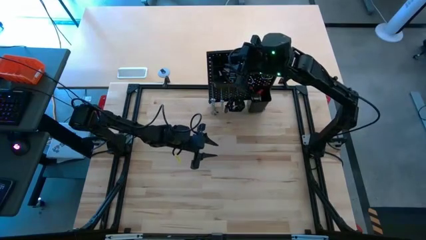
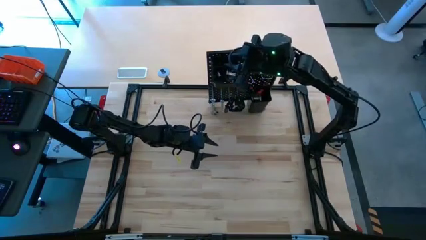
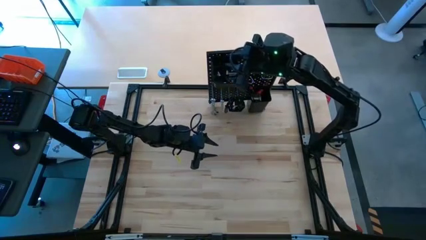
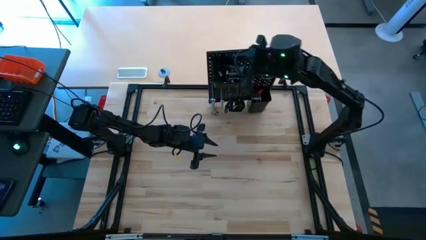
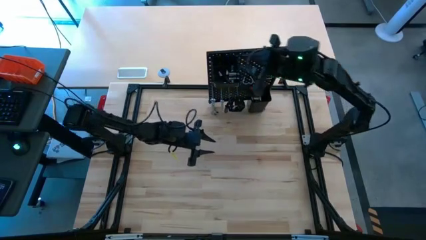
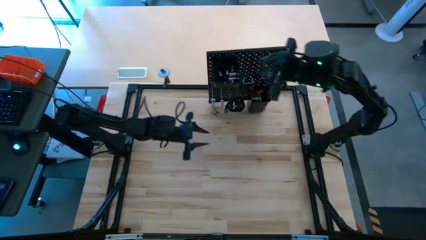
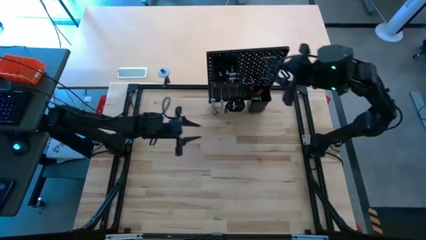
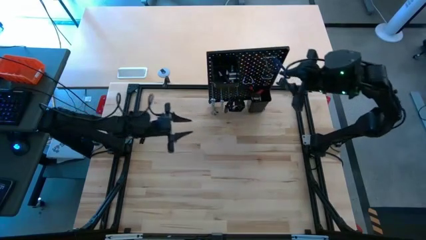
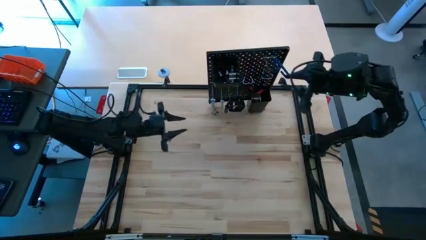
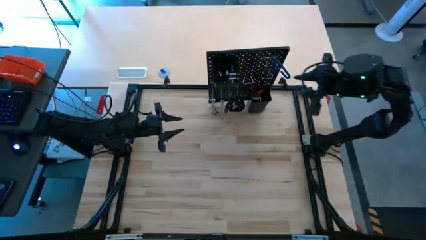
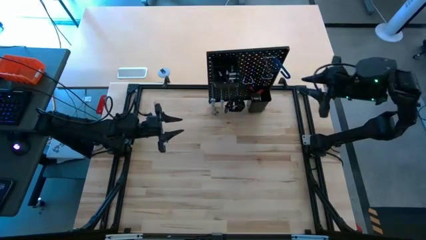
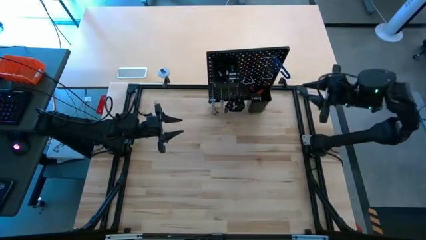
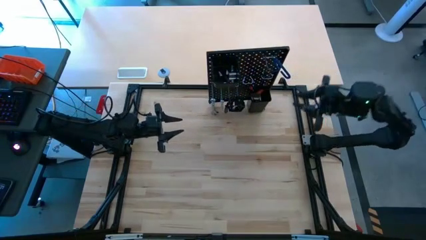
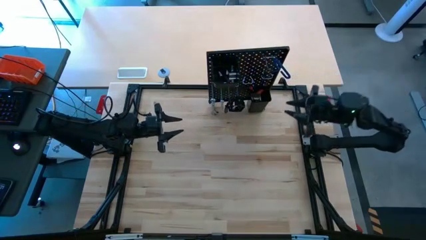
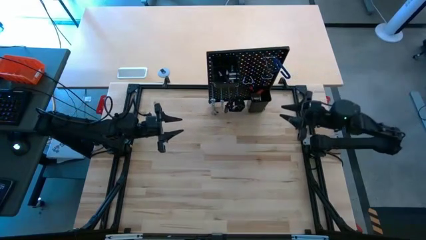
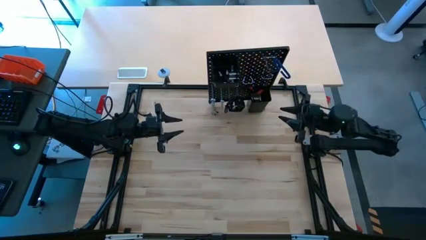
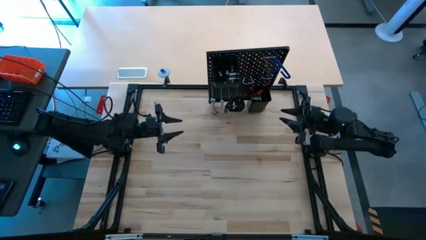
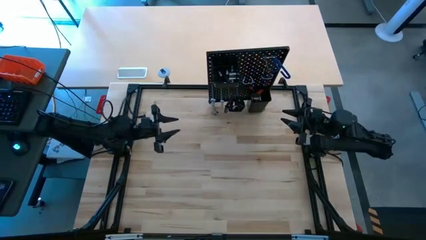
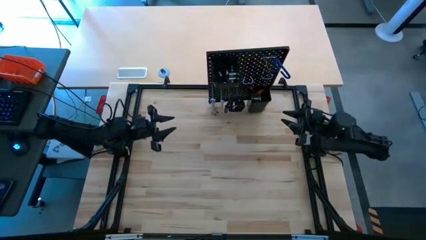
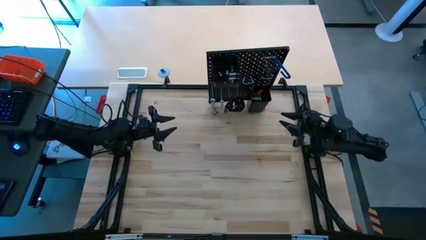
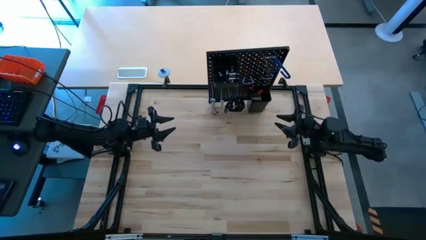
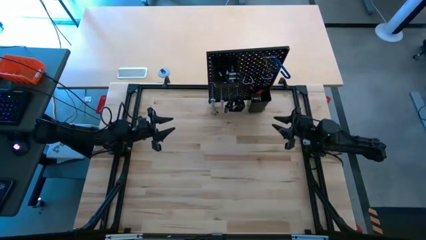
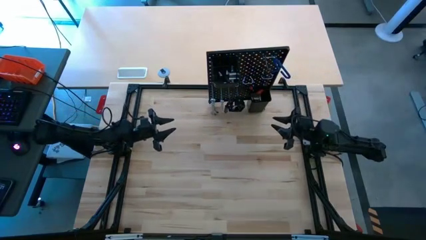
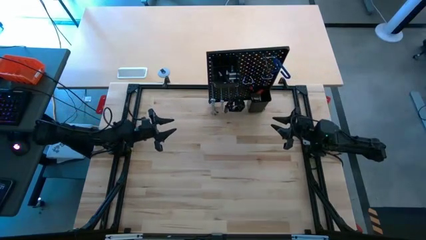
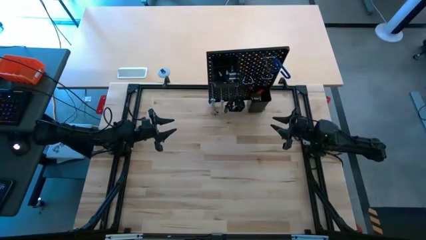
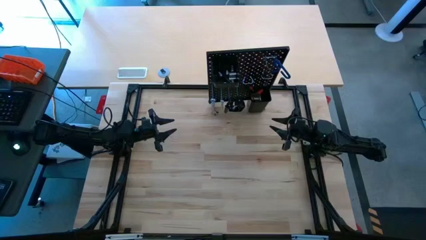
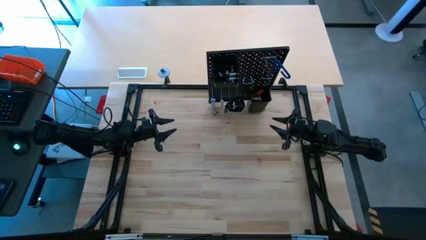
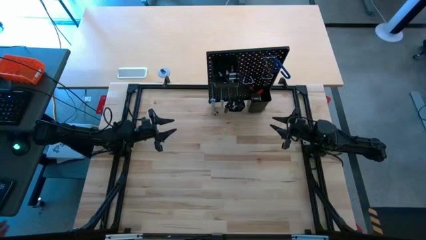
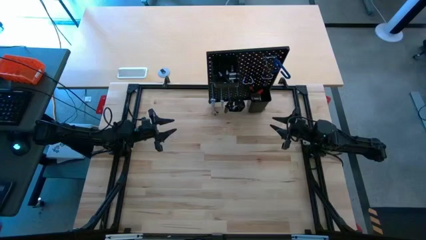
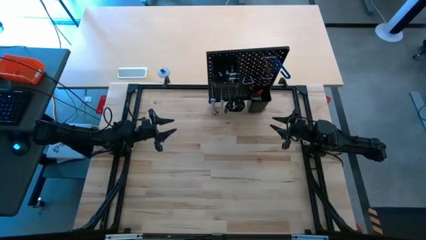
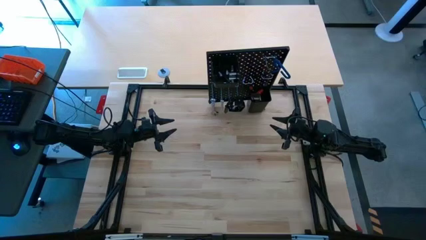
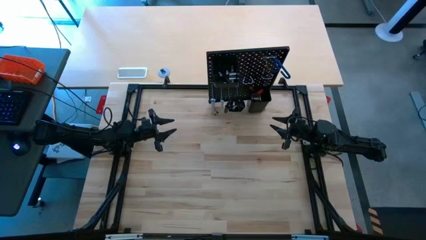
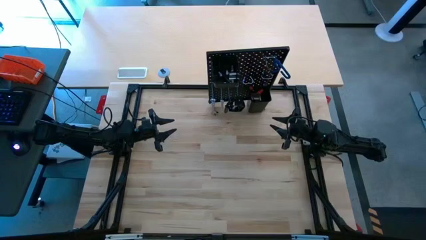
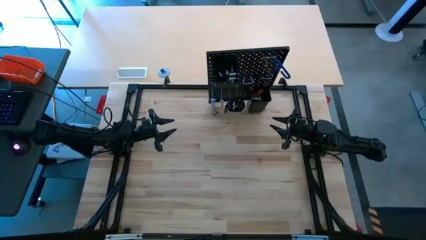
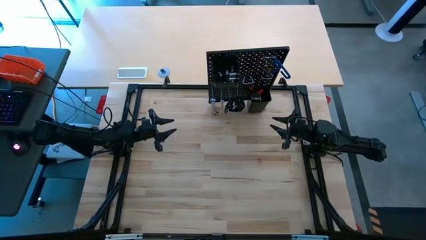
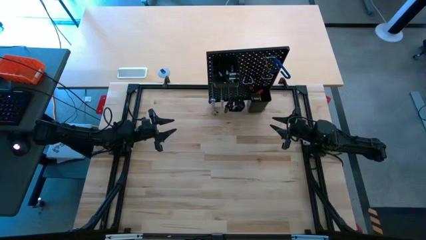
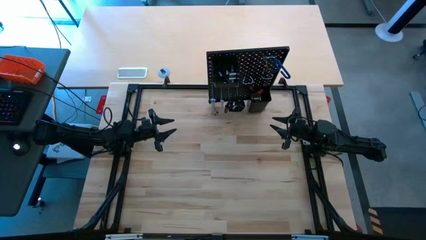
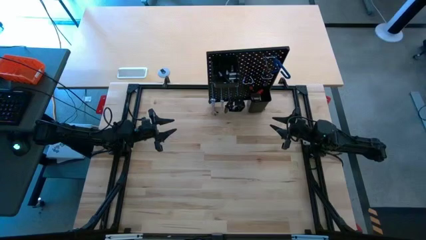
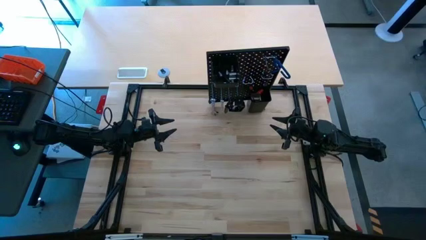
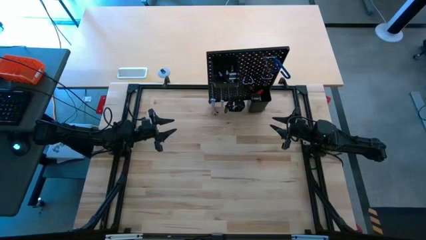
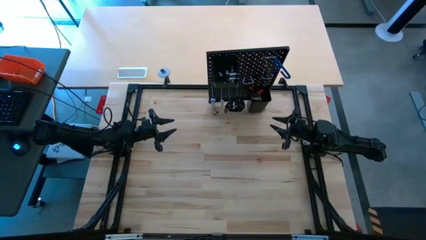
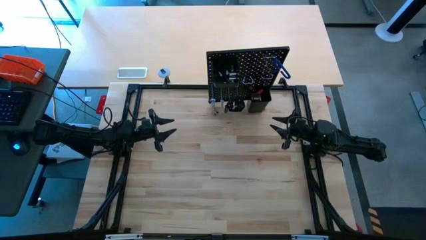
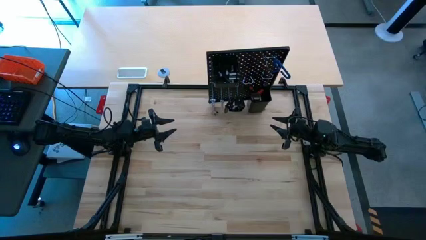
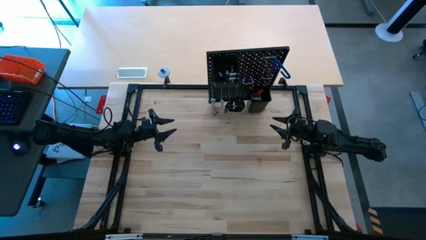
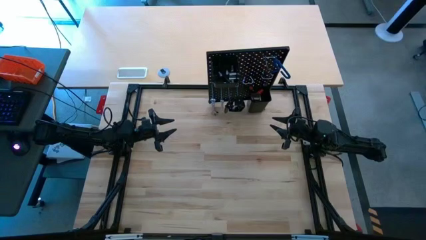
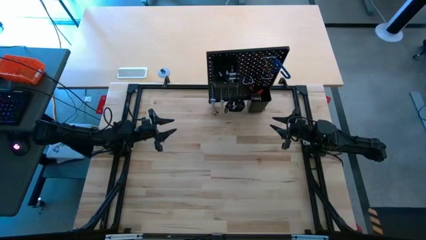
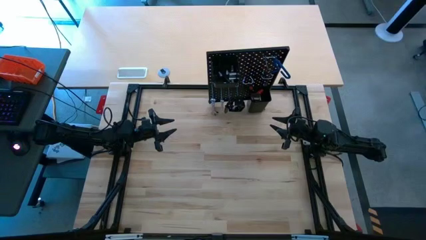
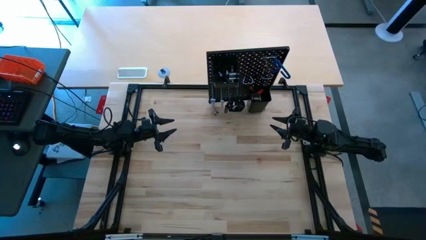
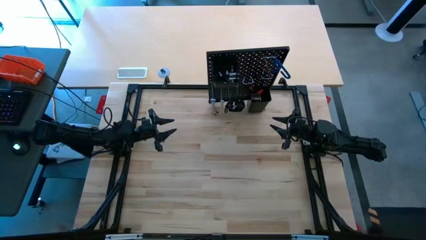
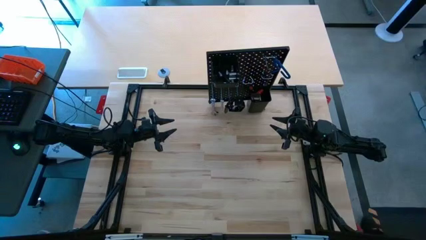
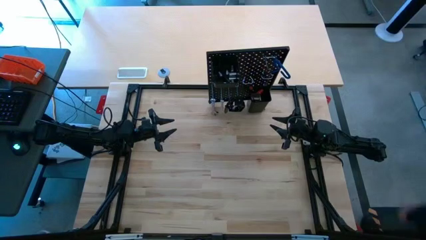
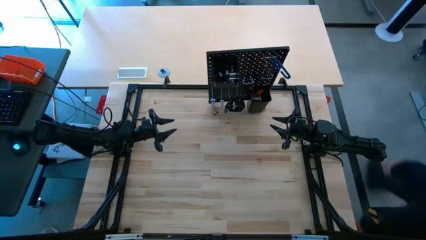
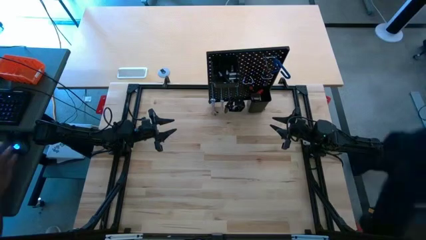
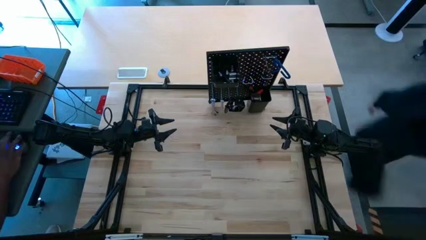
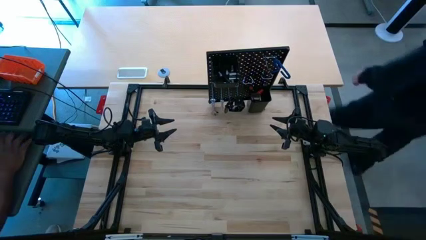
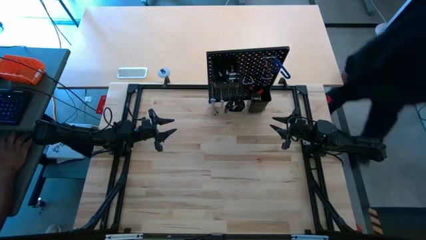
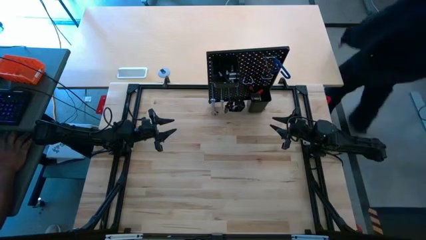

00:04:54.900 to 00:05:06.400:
Task: Hang tools onto peg board
Return to Home Position

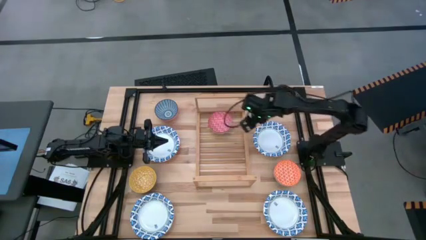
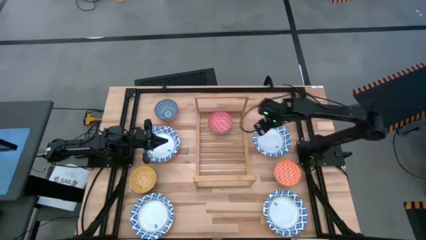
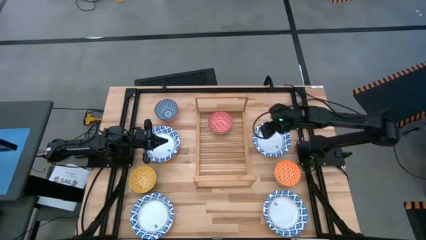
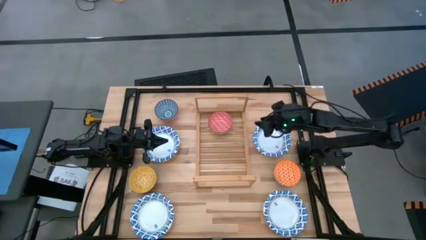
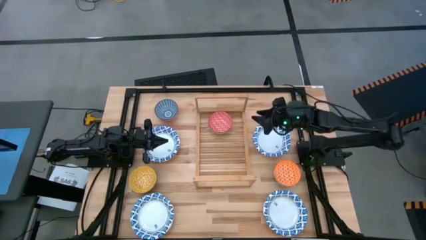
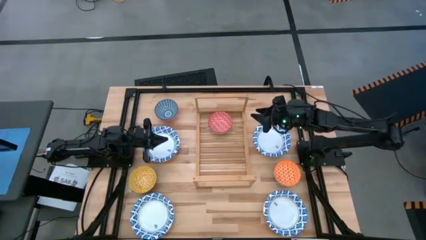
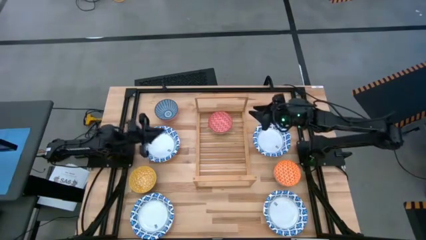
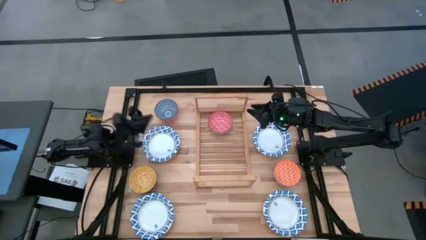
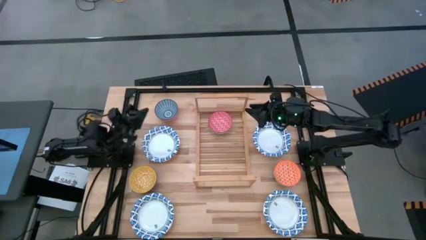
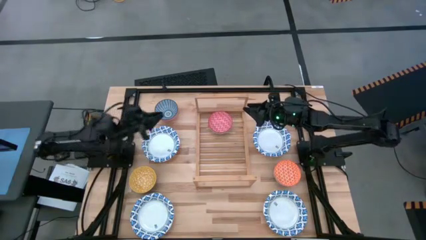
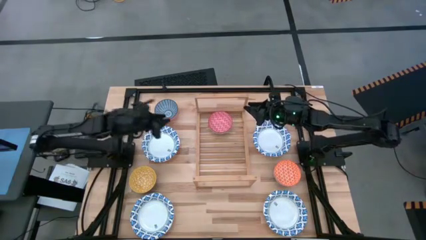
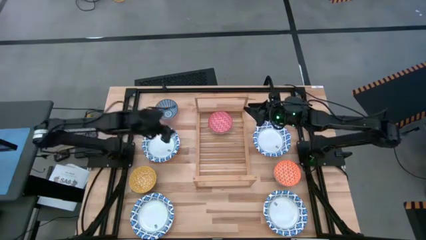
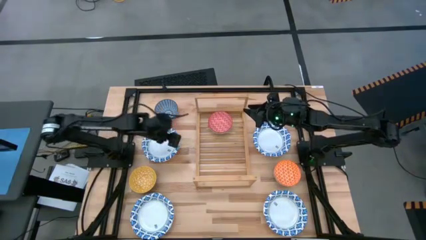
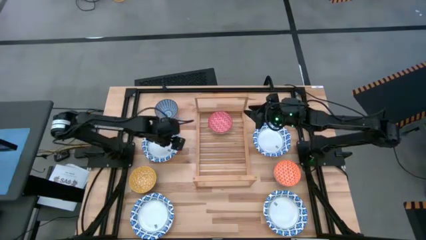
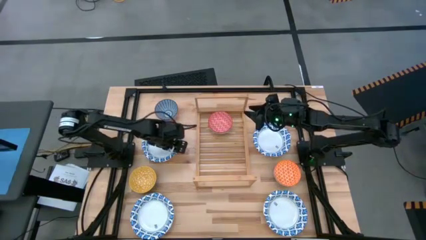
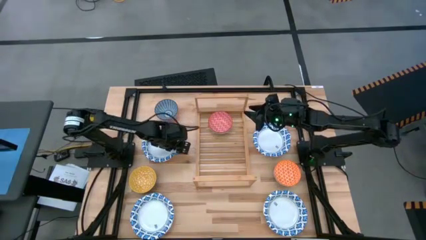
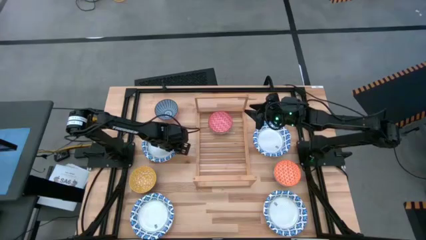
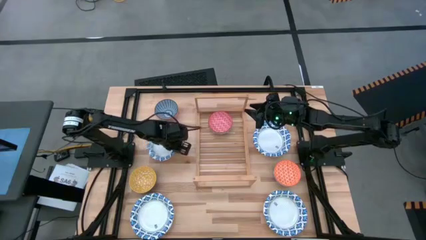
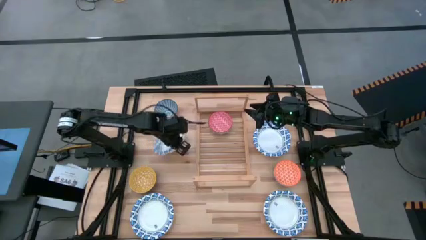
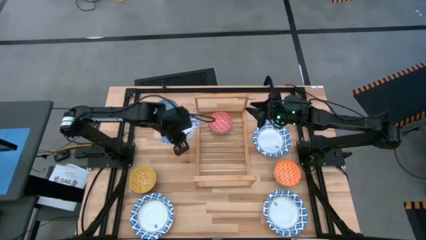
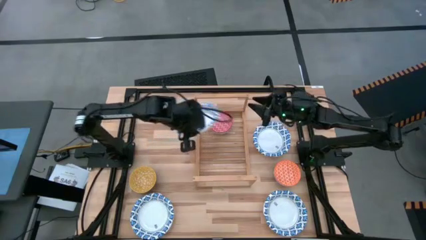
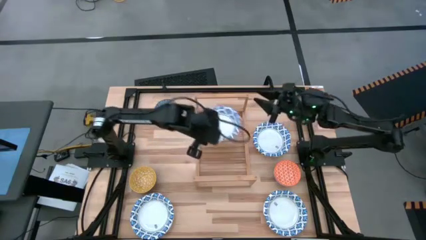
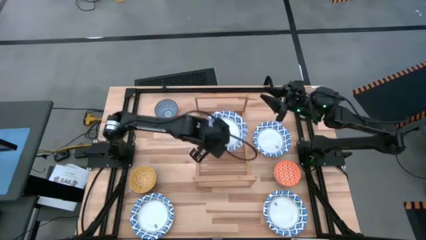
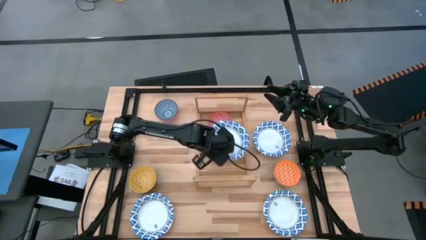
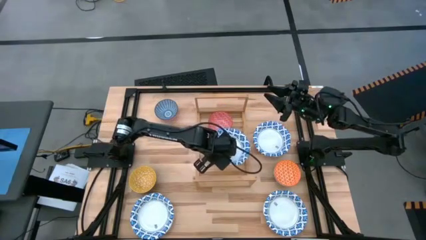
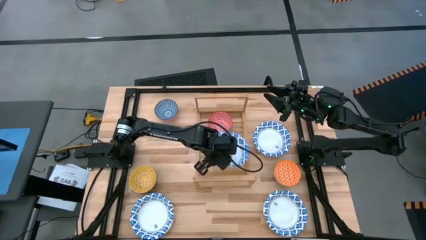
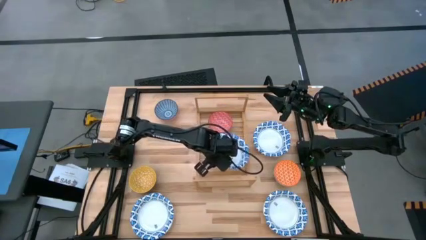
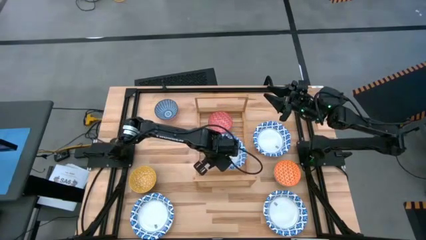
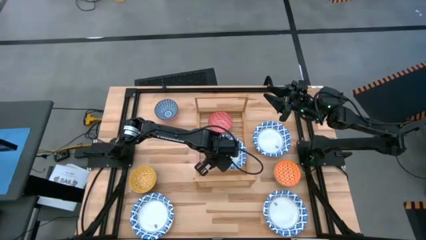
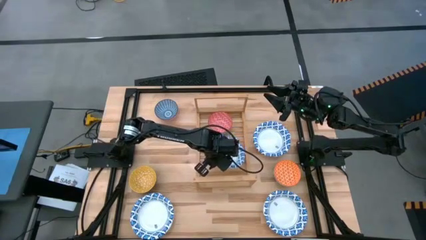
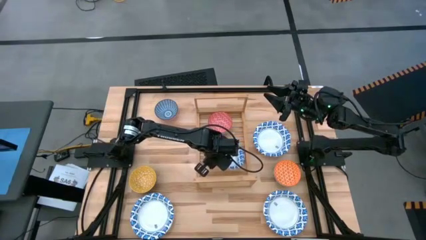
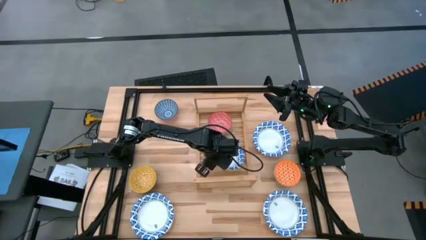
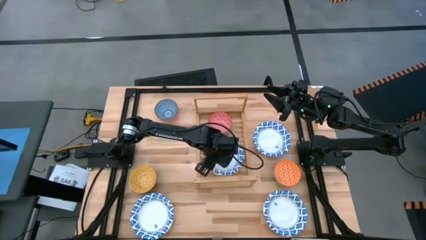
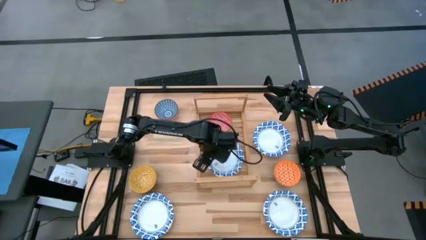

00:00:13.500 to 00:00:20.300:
Task: Place and stack bowls onto a shelf
Put the blue white bowl on the shelf
